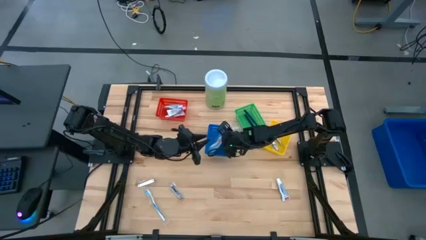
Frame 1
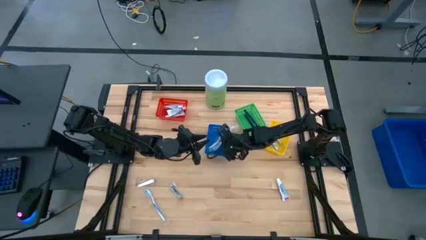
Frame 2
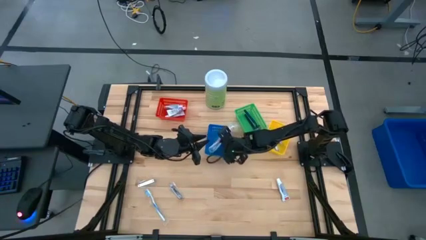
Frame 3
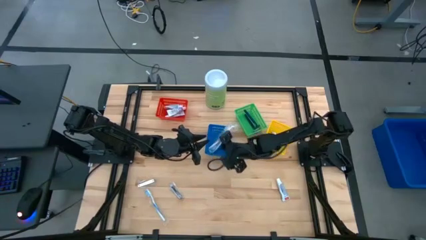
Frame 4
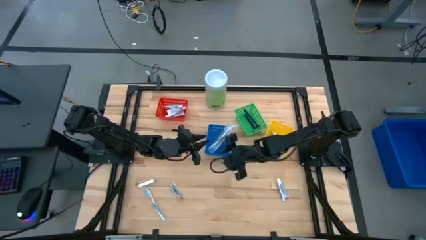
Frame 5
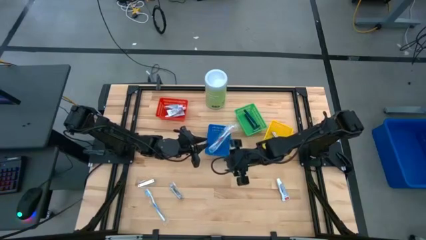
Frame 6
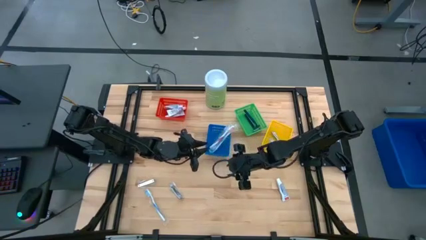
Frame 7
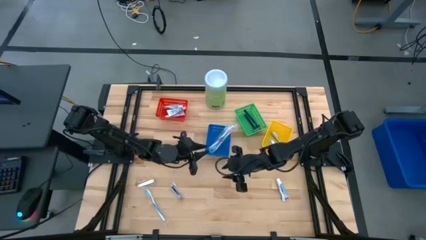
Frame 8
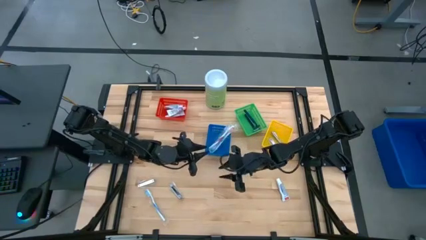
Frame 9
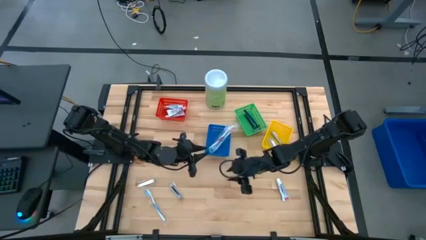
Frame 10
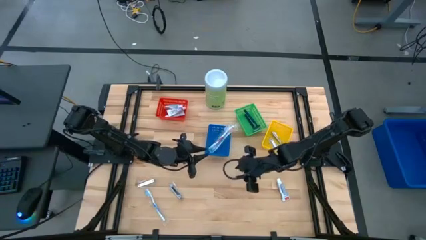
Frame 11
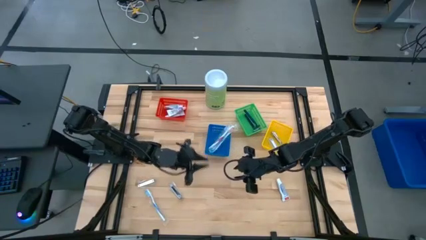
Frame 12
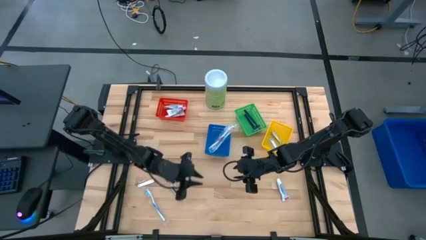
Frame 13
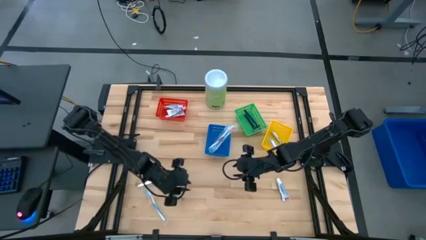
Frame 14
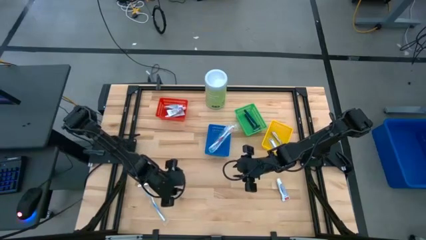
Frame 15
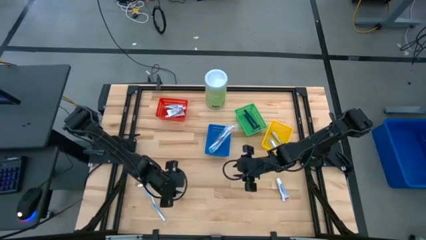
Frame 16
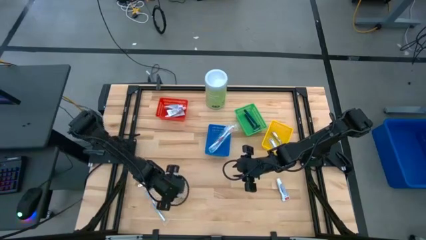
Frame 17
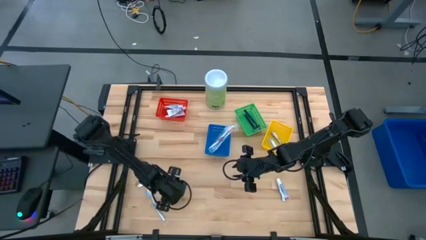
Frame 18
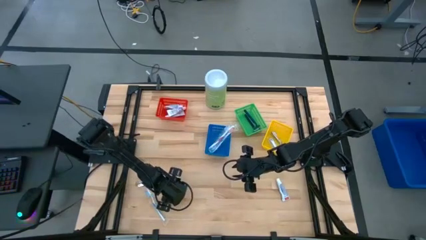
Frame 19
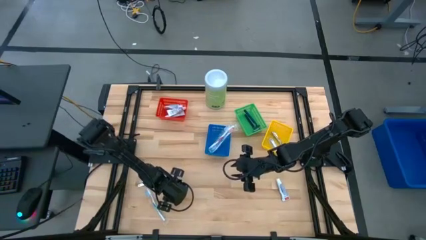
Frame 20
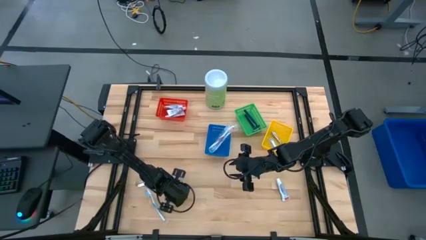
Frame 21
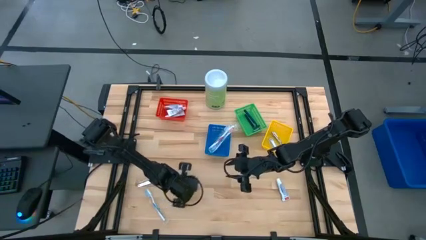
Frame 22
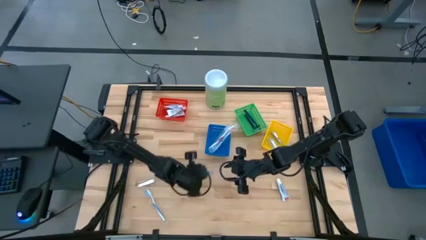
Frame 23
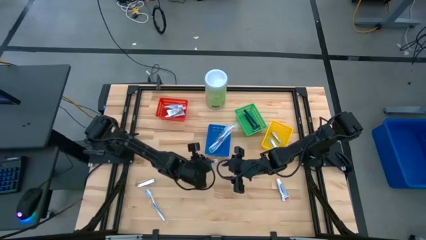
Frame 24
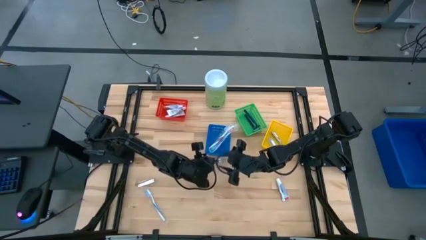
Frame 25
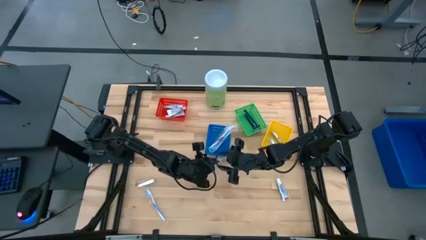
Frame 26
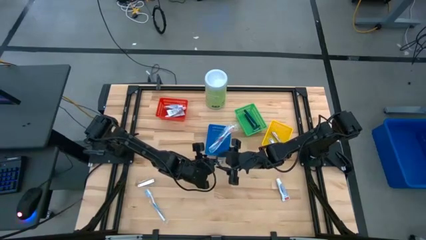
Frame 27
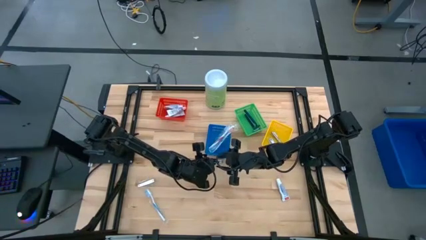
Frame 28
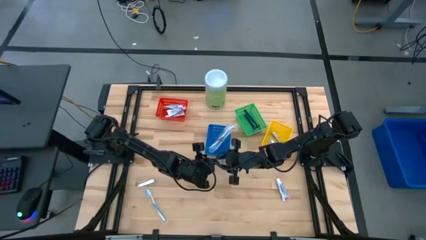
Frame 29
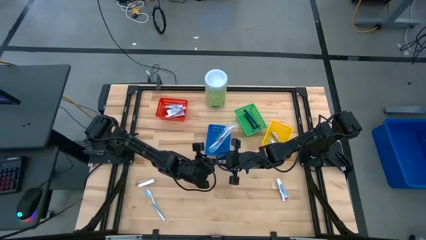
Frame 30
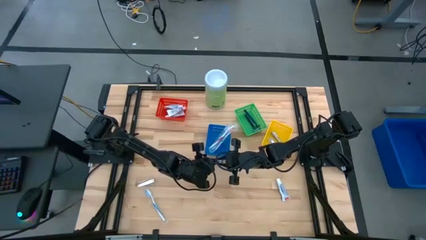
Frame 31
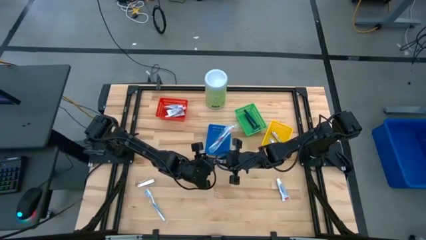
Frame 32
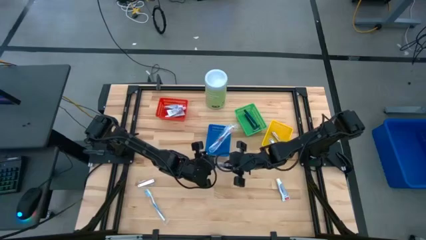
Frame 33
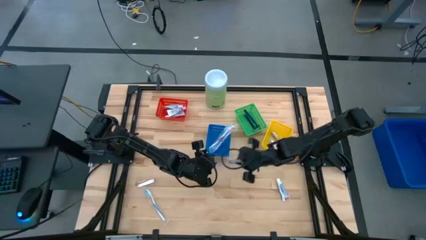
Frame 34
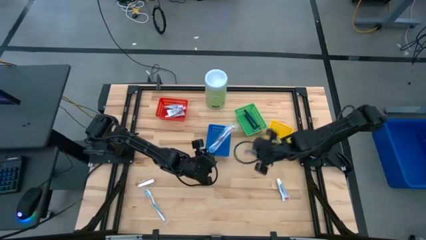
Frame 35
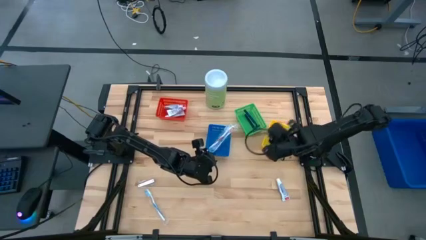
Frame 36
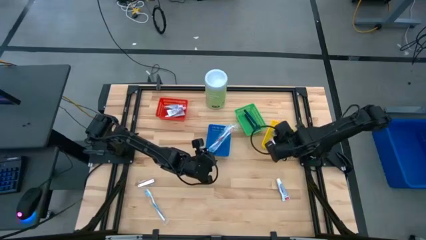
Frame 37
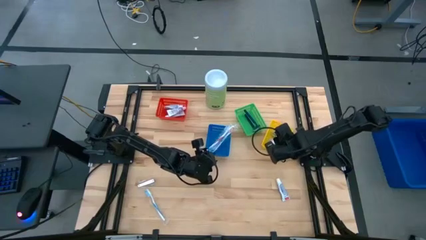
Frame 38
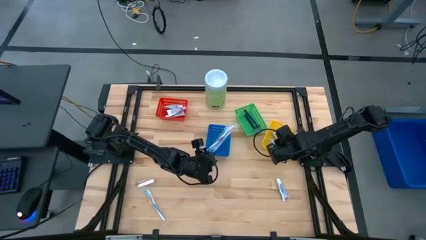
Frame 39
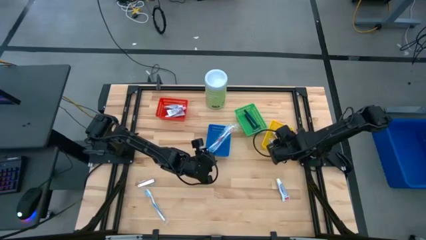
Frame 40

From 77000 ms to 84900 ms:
Task: Pick & Place Travel size toiletries
Put the silver nail cutter into the yellow bin

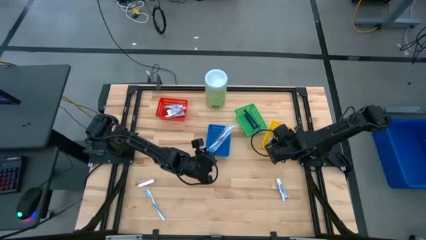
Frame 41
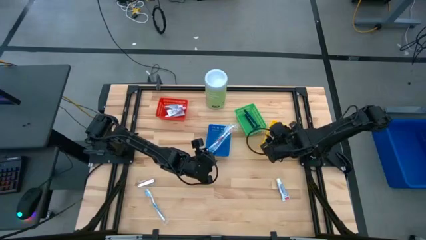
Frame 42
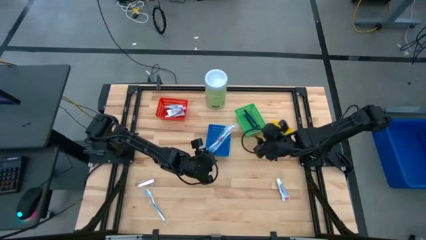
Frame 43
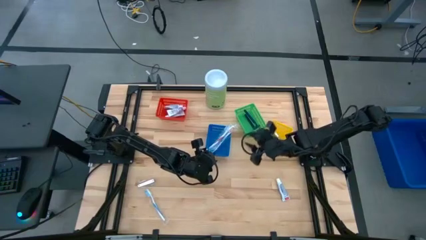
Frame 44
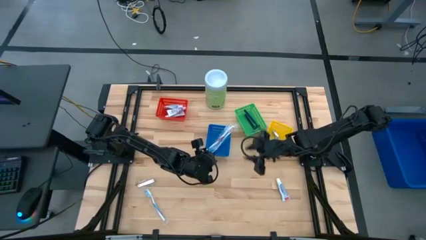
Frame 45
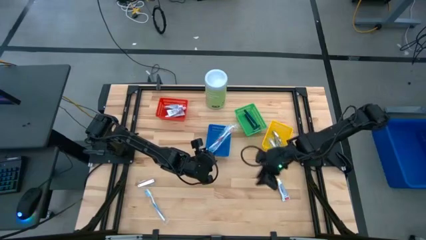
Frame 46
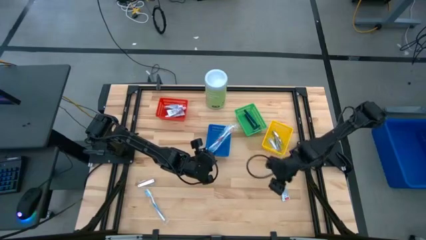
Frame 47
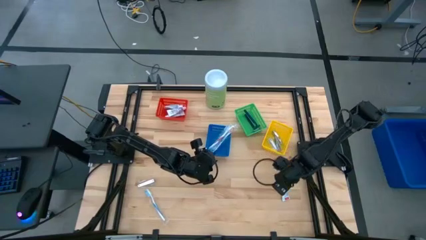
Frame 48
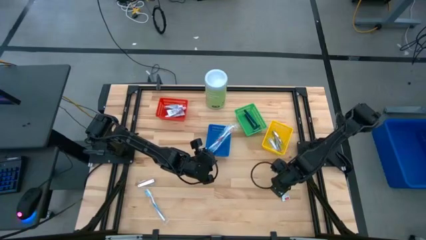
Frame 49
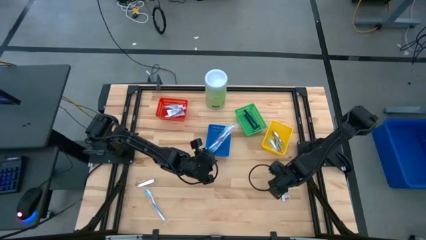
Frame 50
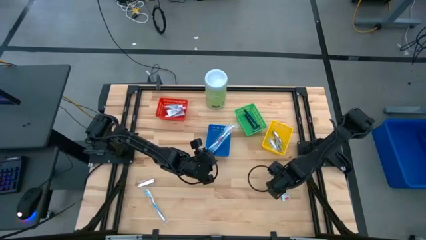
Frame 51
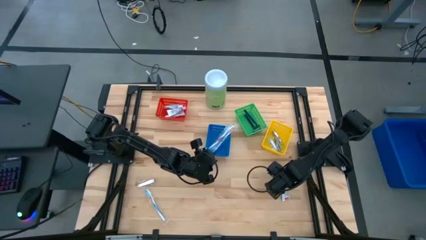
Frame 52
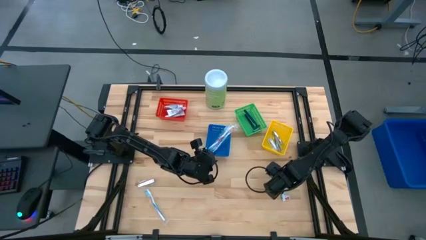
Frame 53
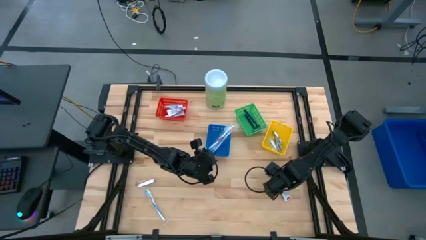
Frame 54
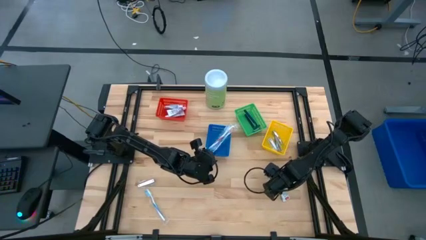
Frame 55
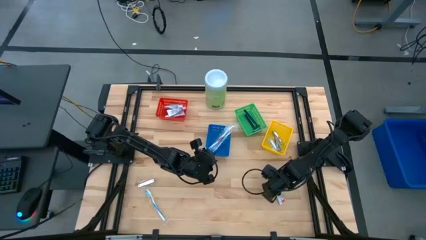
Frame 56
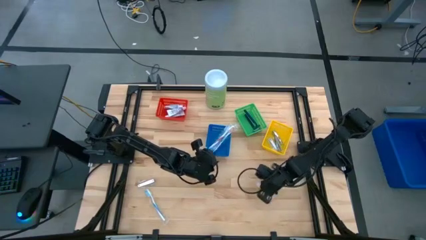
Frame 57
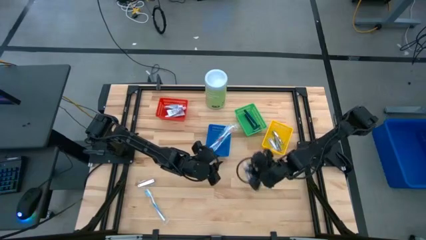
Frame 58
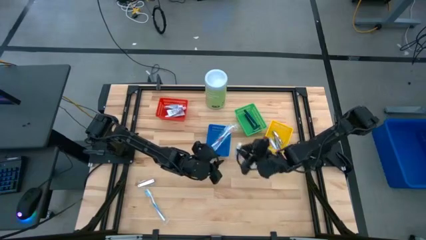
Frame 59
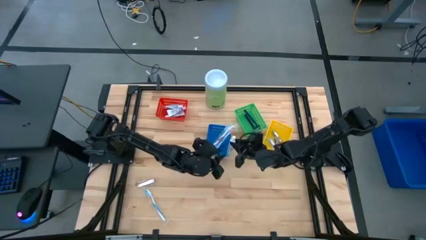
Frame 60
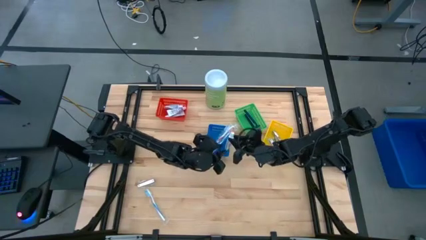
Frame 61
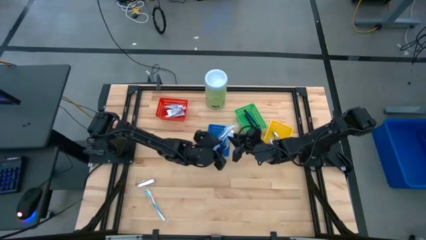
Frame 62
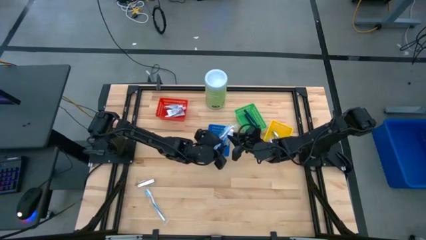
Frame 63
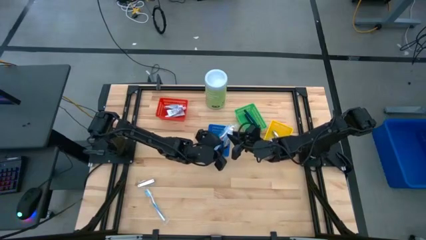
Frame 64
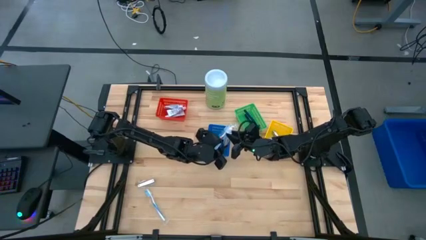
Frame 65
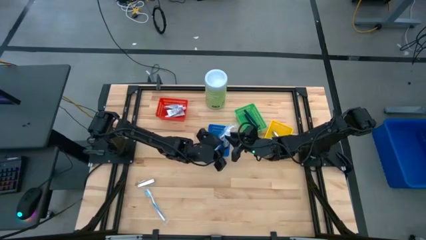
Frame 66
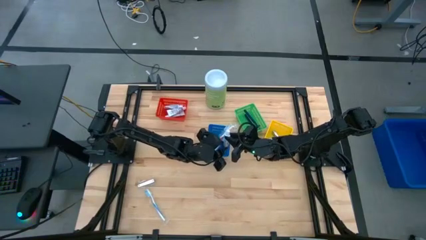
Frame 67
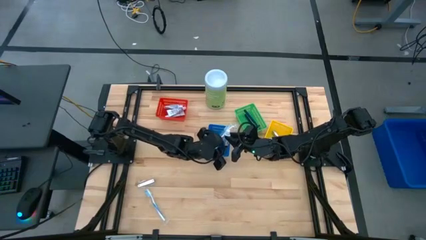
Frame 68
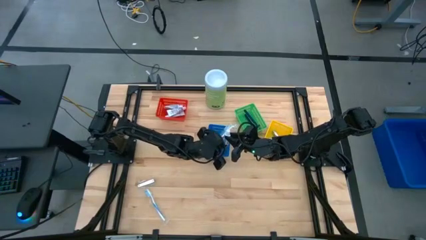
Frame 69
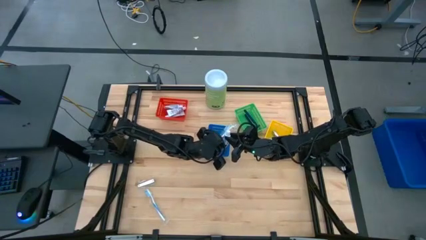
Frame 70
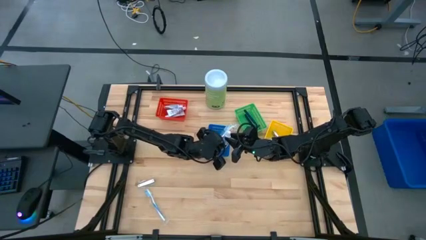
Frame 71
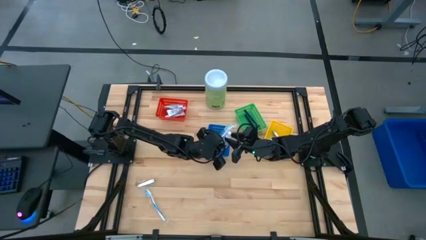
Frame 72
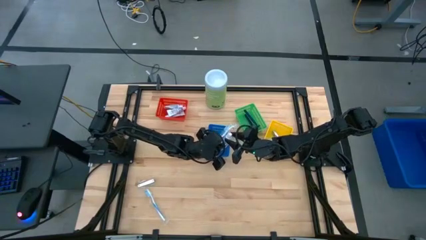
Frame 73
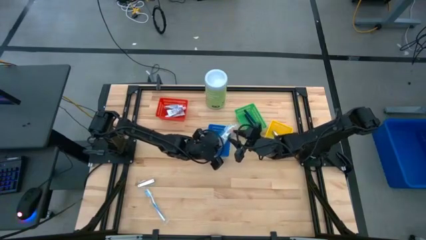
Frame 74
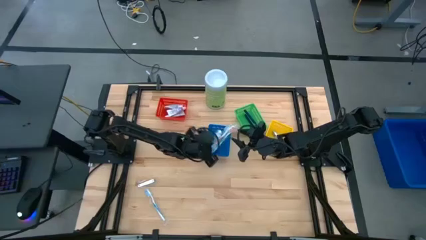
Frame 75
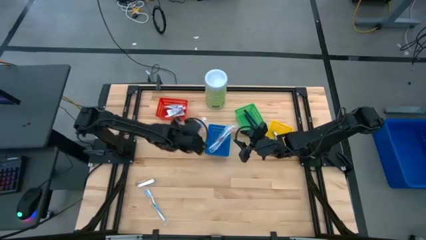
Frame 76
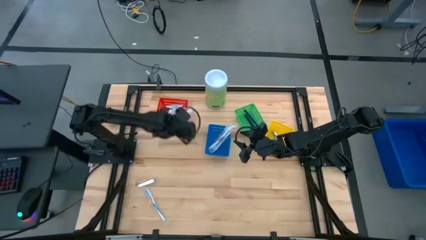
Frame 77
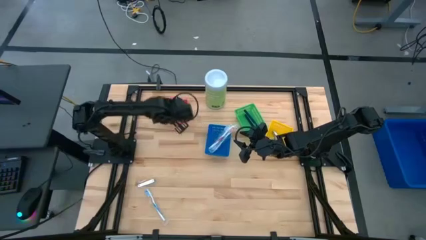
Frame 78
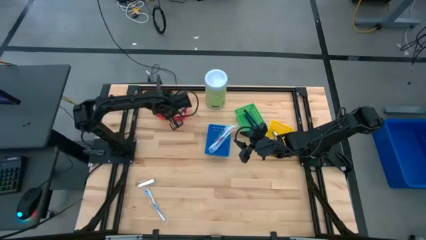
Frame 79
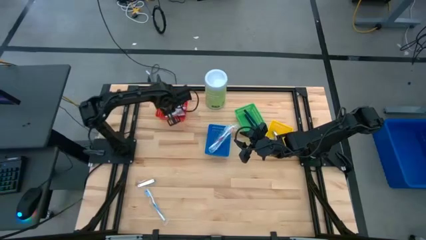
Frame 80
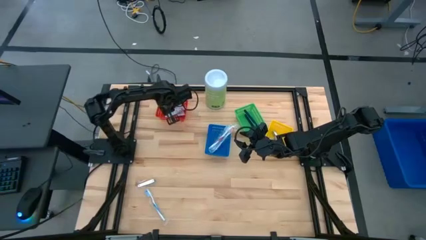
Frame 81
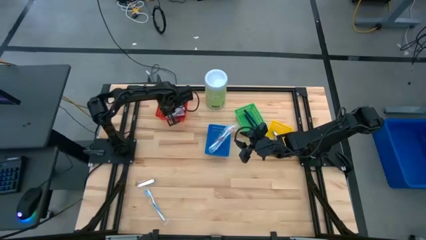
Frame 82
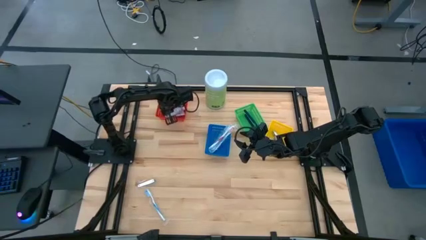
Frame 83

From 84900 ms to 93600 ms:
Put the white toothpaste into the red bin
